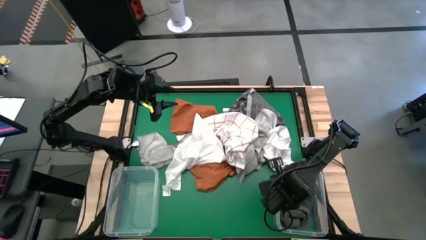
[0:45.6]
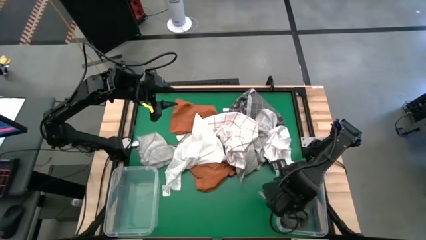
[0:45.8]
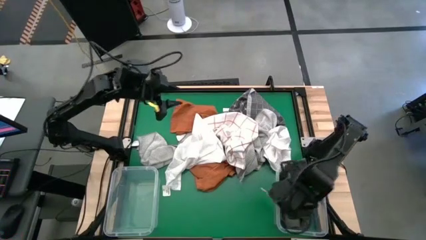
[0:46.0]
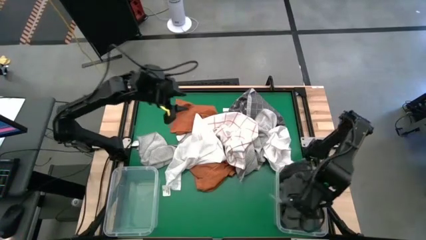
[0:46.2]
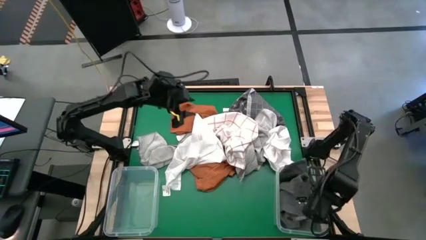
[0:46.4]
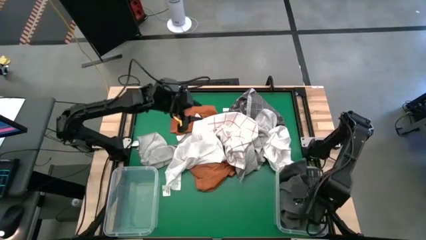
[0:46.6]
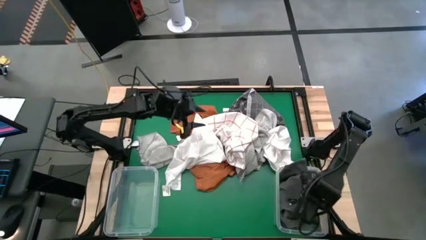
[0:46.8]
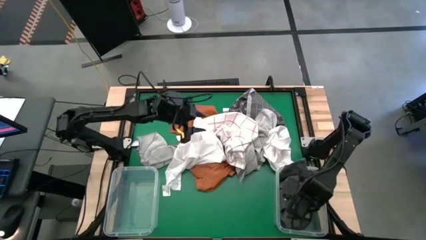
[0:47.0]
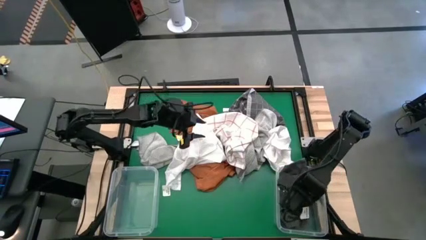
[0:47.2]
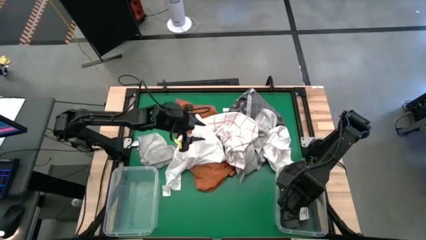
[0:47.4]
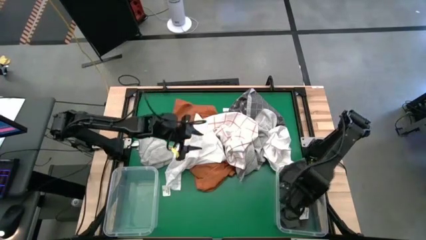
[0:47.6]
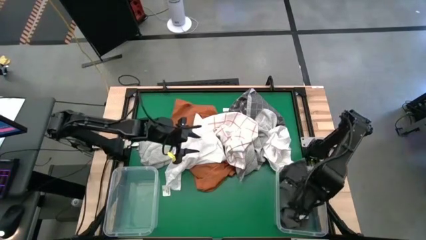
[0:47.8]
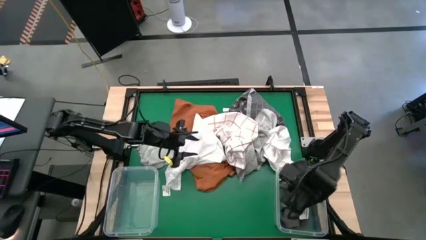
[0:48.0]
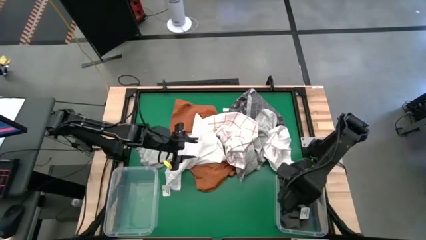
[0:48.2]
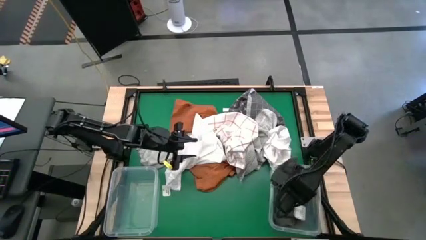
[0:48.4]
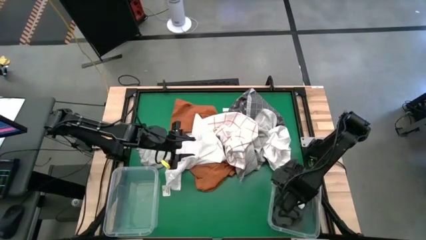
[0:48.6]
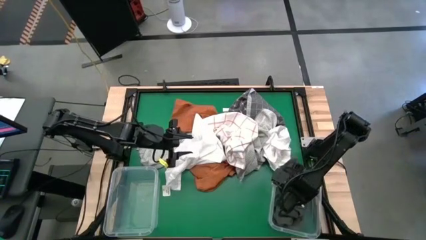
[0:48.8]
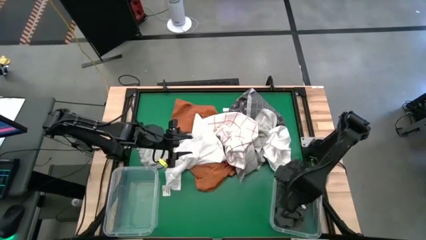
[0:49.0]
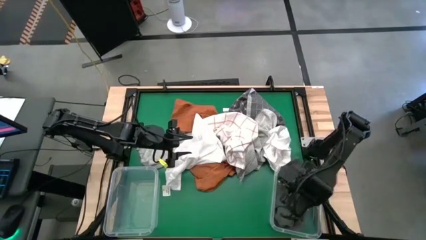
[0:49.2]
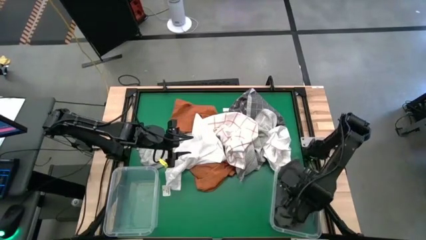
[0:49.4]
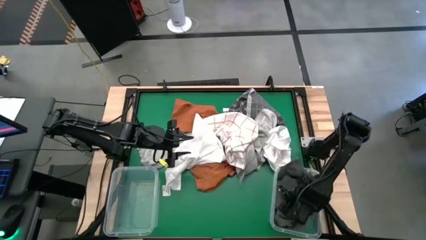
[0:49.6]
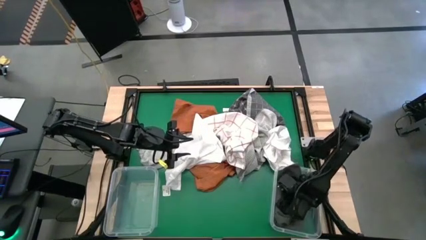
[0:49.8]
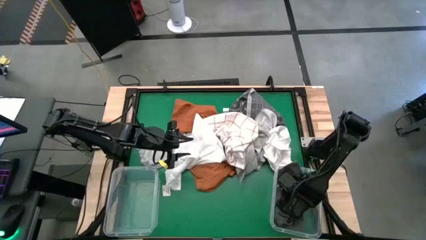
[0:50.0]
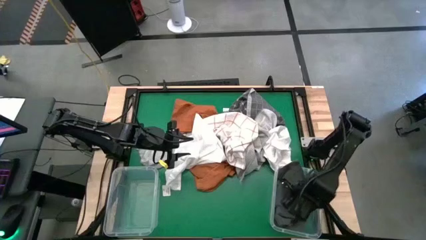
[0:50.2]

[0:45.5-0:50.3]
Task: Sort towels by color in basket
Put the gray towel into the right transparent bin

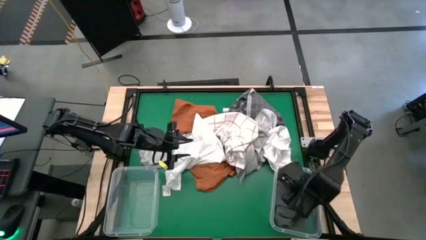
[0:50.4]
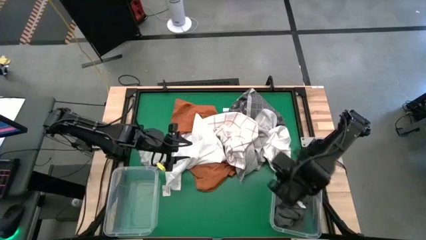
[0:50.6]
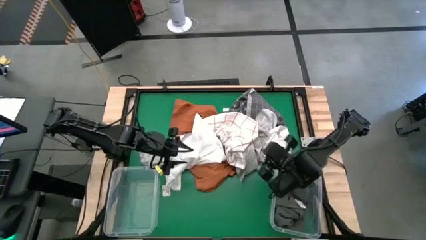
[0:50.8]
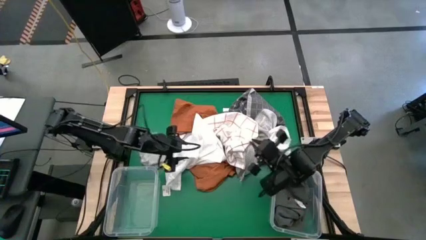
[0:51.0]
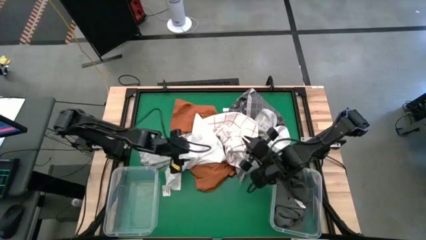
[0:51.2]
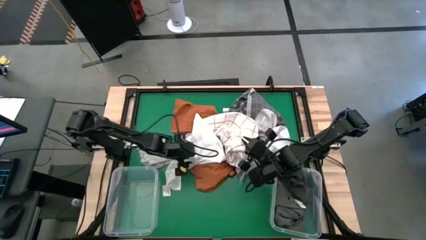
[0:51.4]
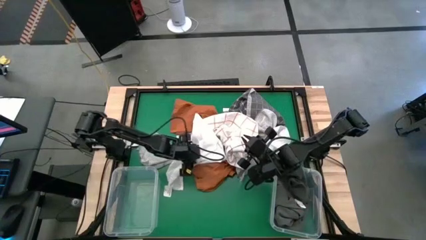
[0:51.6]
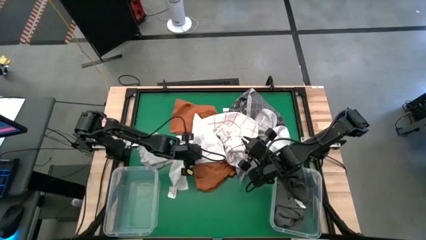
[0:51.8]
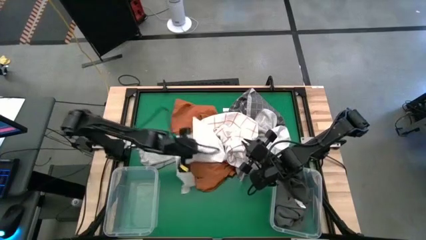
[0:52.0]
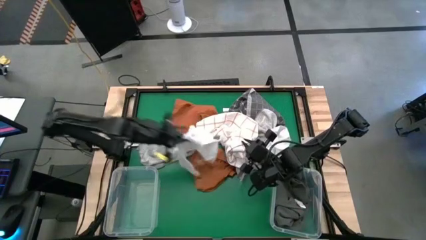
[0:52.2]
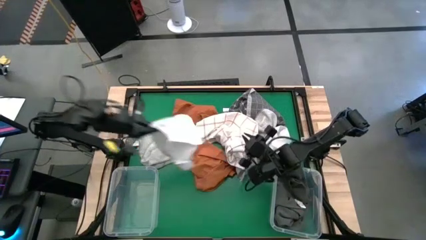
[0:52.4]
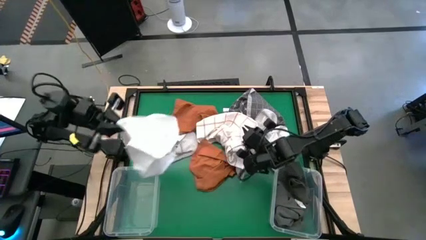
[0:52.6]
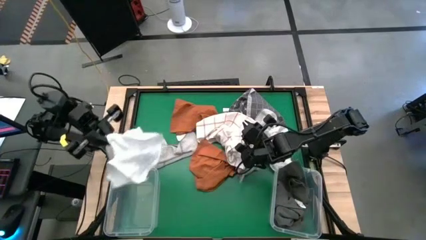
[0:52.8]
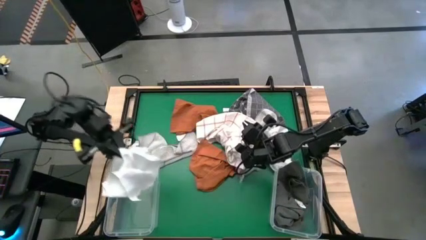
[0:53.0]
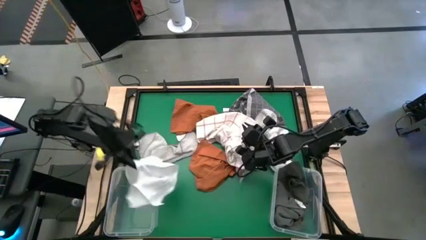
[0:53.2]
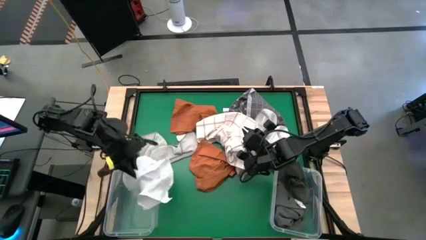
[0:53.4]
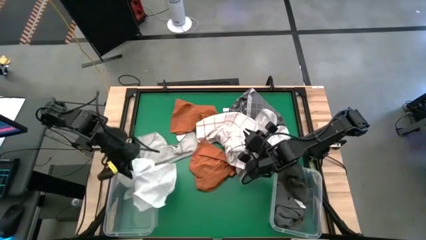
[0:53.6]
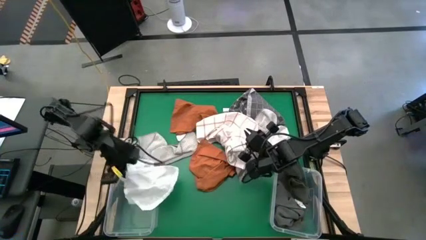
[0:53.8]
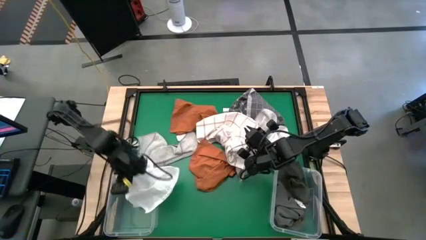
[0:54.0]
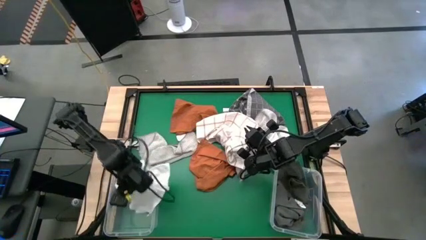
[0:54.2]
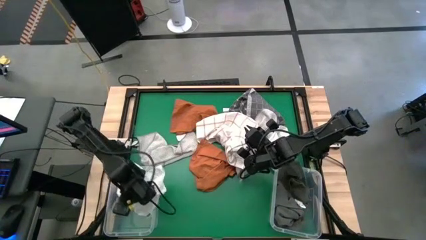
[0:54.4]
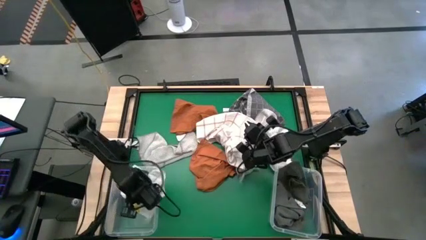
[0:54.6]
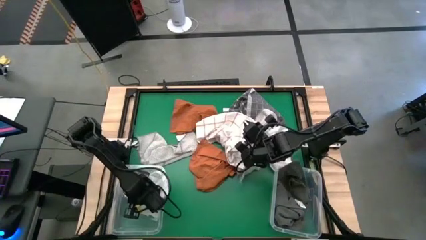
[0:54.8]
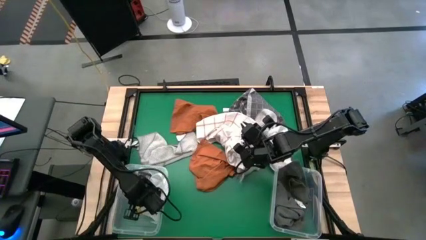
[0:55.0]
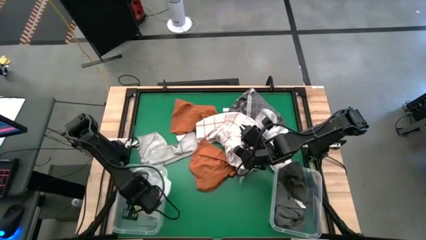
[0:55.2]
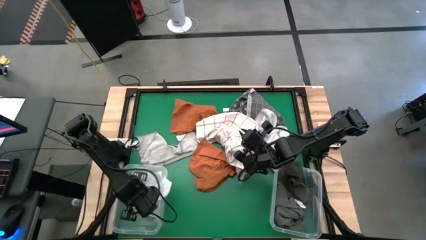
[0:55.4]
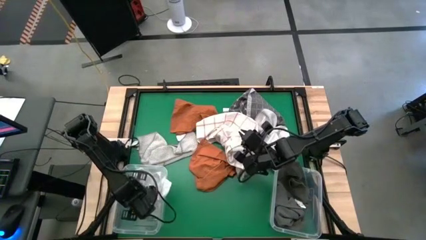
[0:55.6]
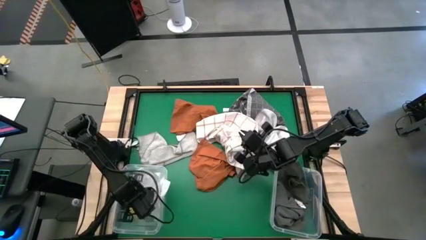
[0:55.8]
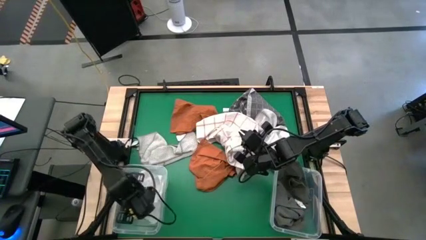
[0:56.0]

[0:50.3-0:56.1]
Put the white towel into the left transparent bin

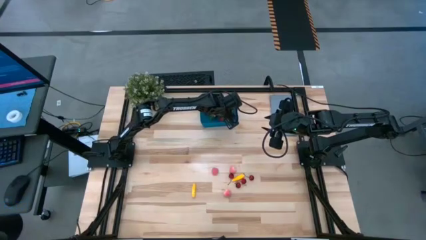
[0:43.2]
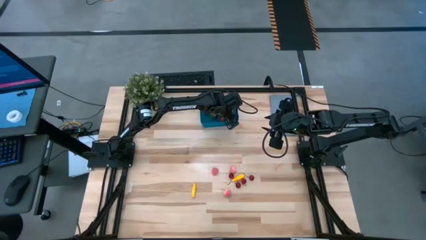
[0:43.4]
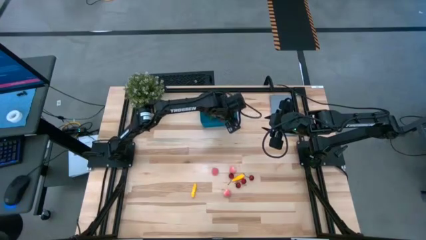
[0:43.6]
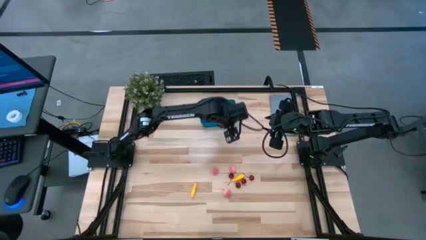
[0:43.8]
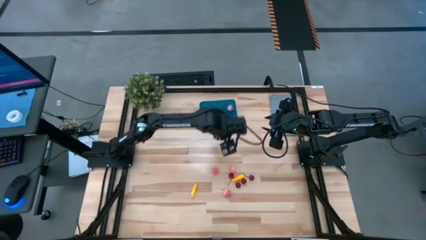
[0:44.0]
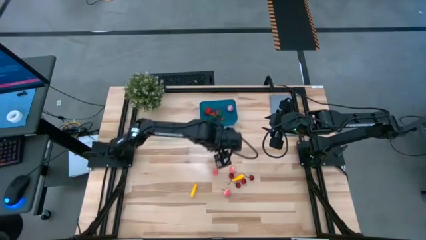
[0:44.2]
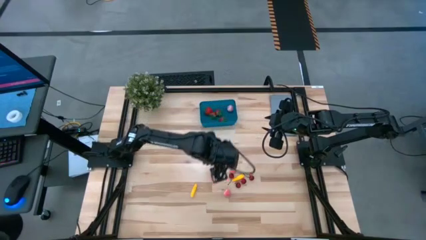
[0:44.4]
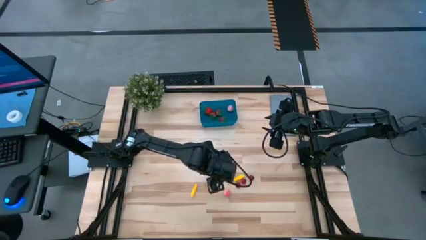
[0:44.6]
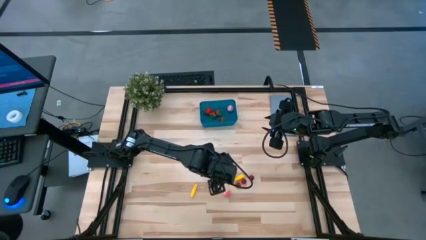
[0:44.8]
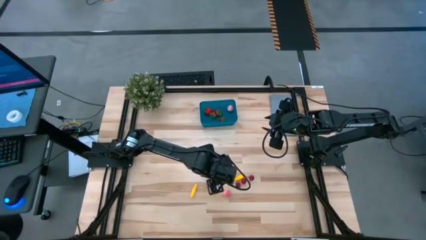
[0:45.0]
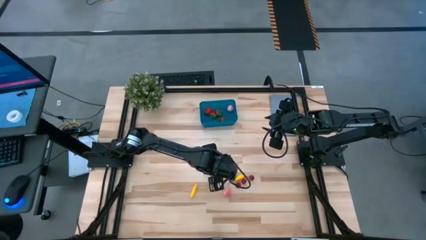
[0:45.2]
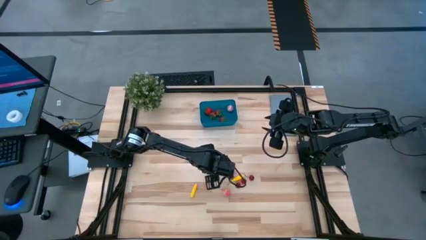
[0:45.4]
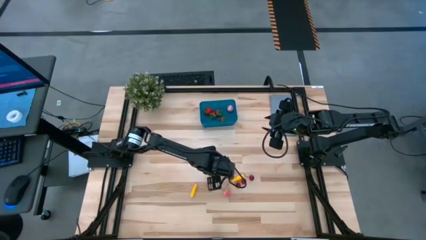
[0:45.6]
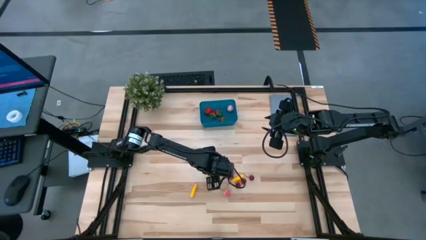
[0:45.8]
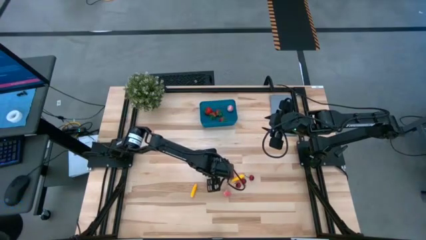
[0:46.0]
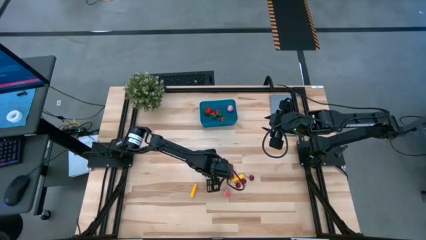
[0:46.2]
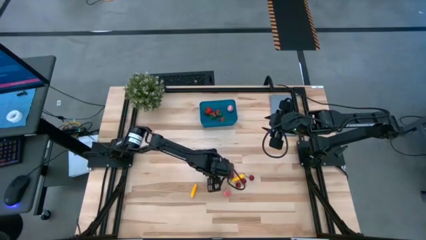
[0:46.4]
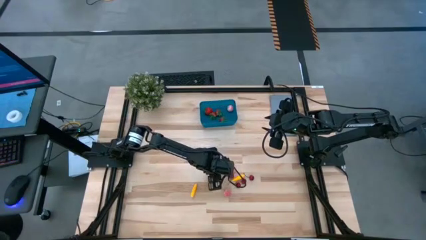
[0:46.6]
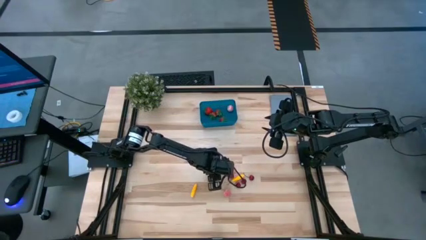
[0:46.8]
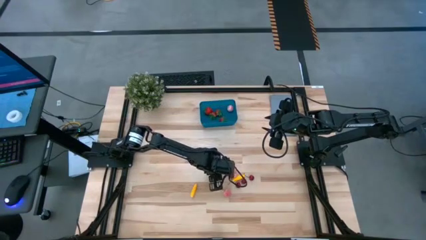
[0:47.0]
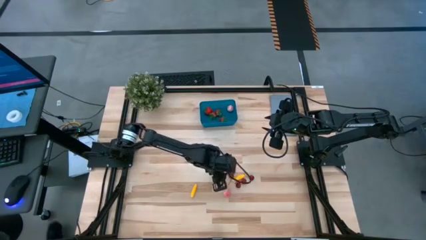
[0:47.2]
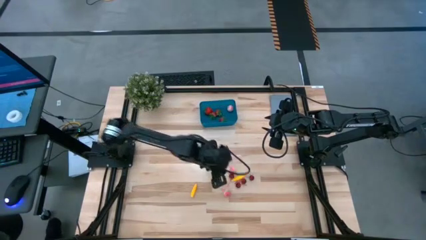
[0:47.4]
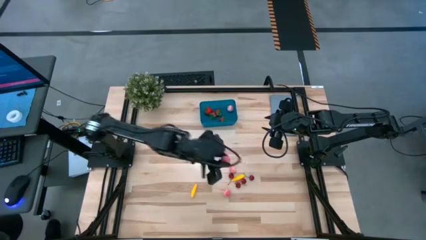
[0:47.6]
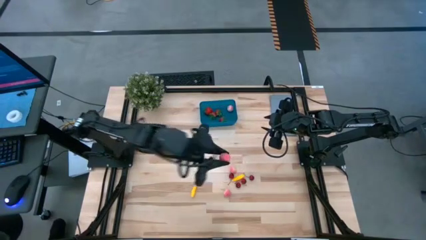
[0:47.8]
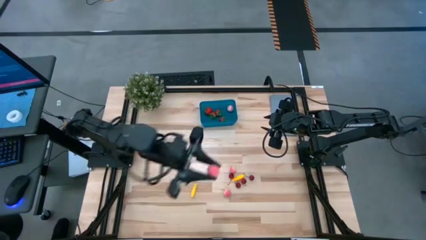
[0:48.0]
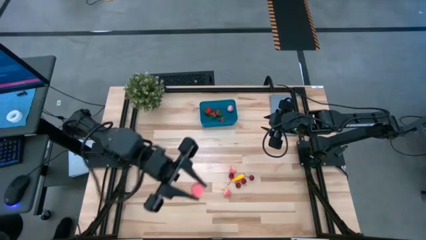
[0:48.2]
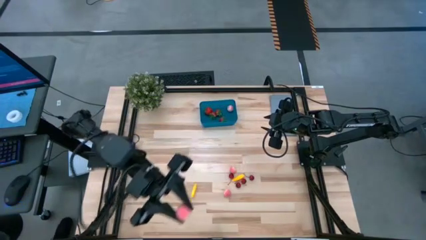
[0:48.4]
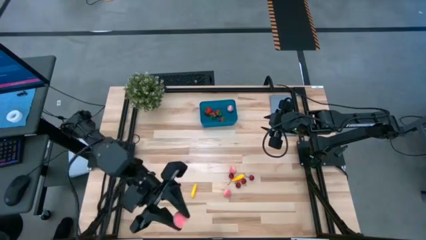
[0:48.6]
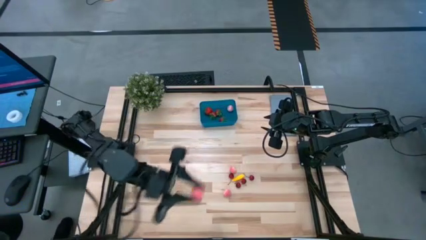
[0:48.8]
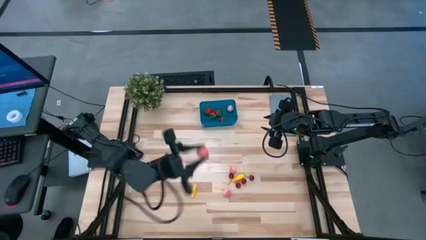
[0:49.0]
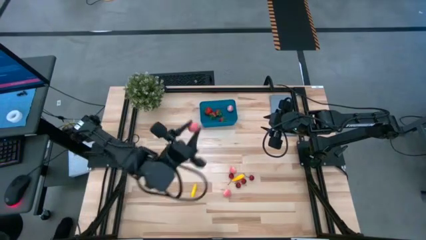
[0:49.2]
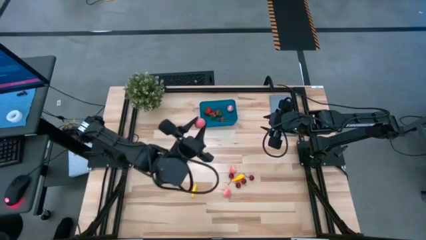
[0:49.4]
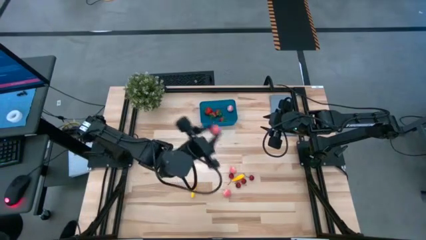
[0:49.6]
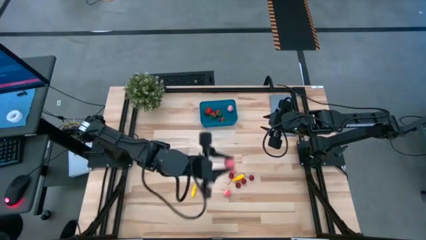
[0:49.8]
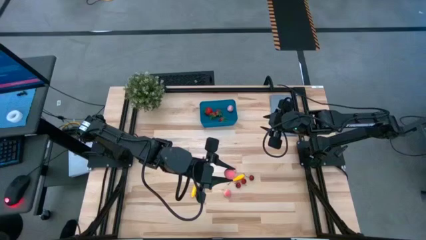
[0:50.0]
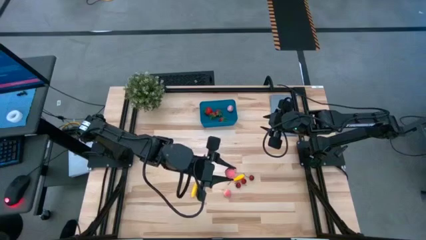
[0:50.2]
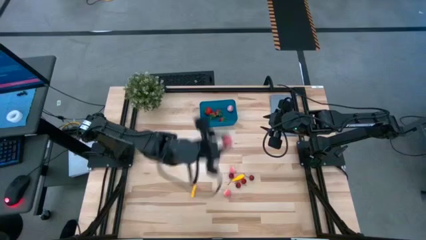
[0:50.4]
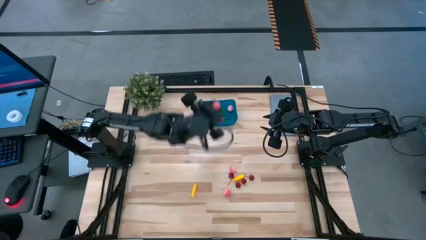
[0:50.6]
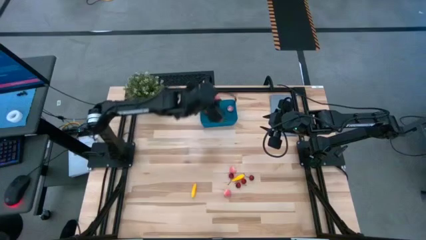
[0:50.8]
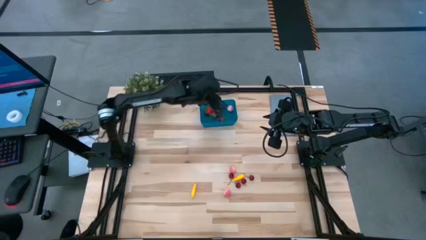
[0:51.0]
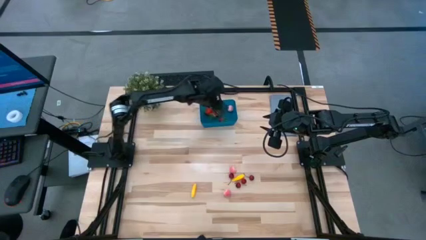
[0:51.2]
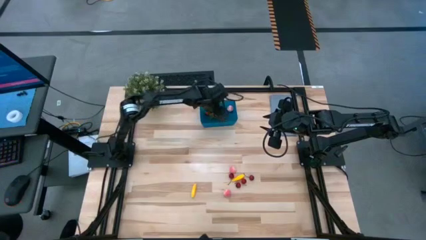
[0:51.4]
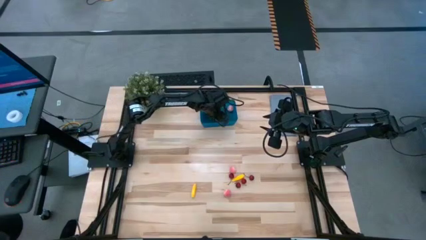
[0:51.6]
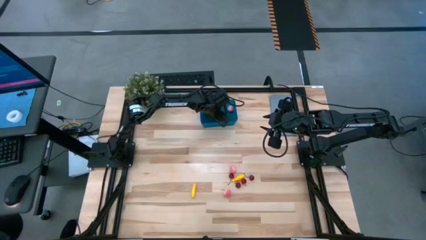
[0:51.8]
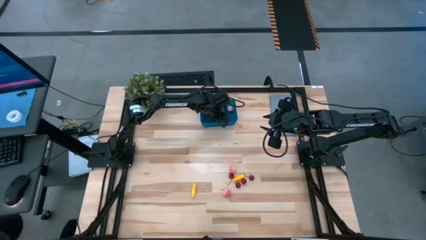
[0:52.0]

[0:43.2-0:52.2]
Task: Pick and placing Produce into tupperware
Put the peach into the blue bin
